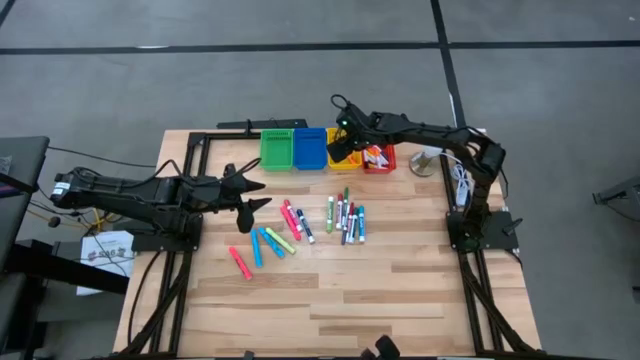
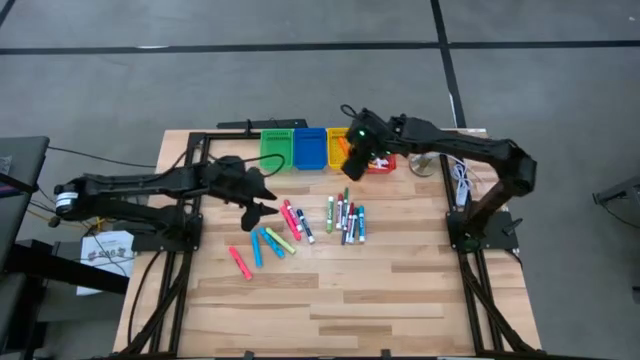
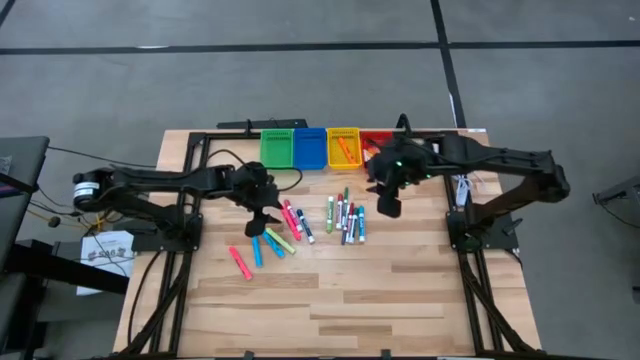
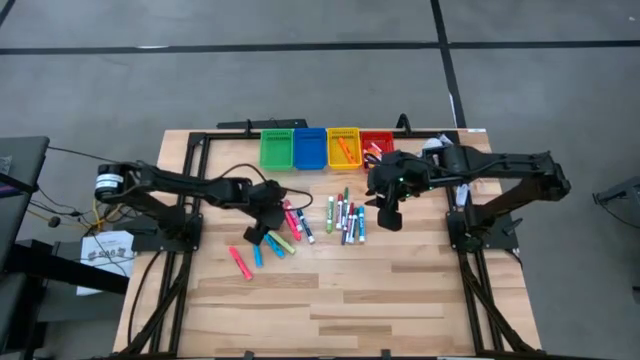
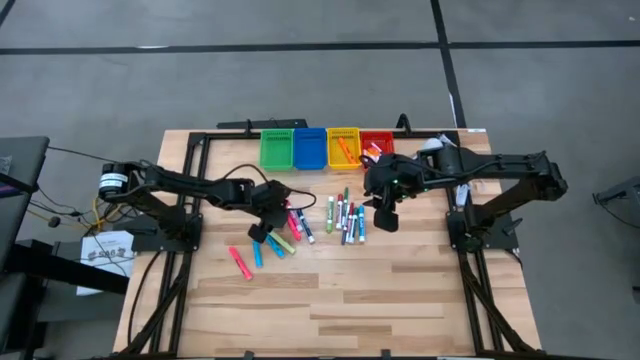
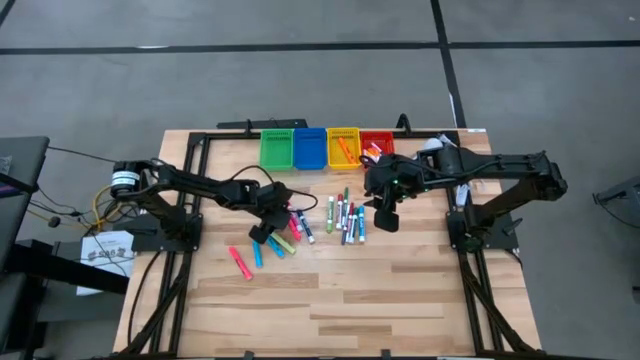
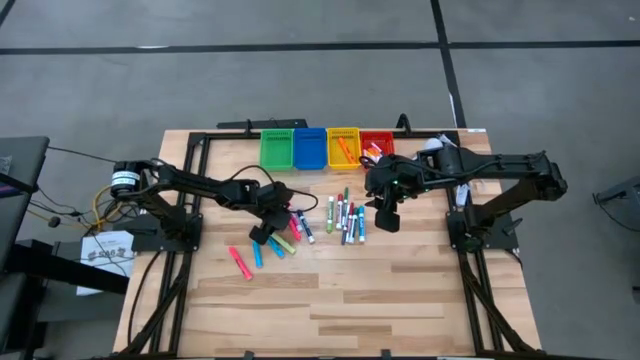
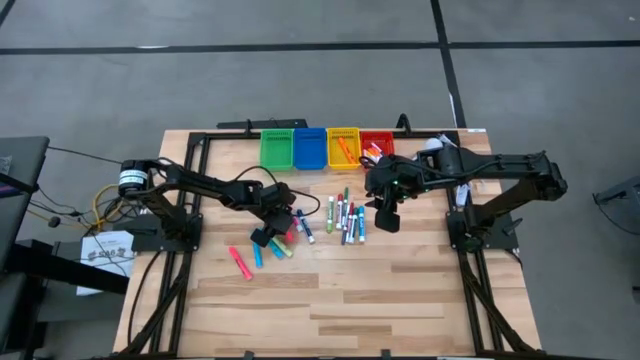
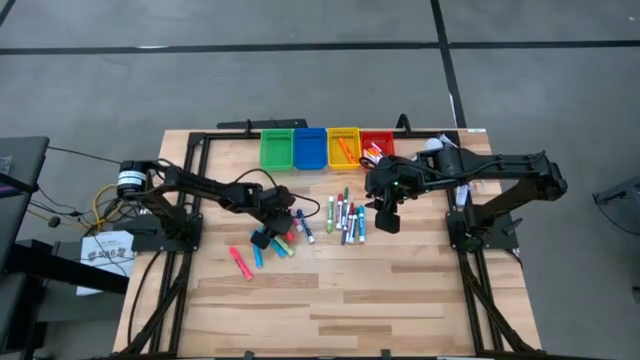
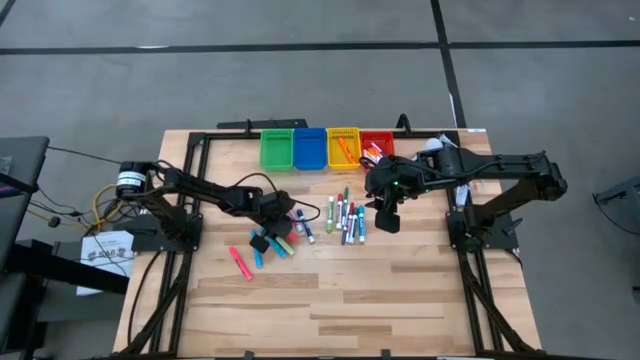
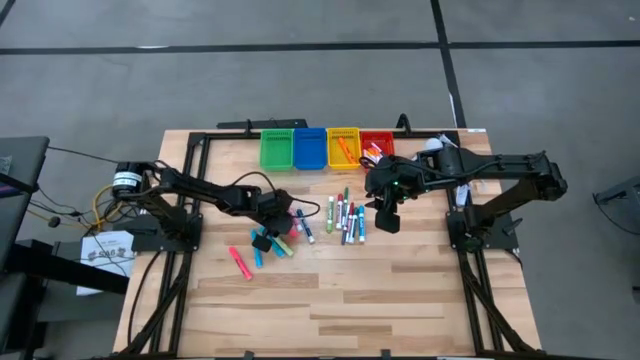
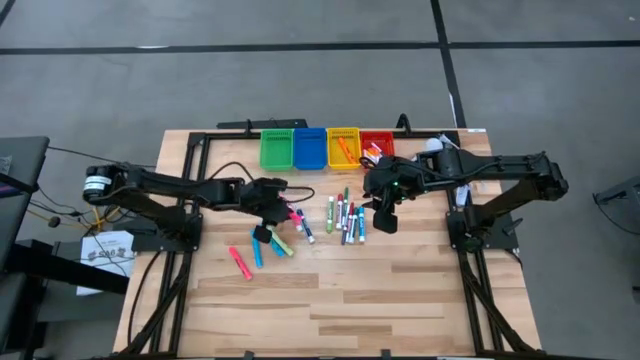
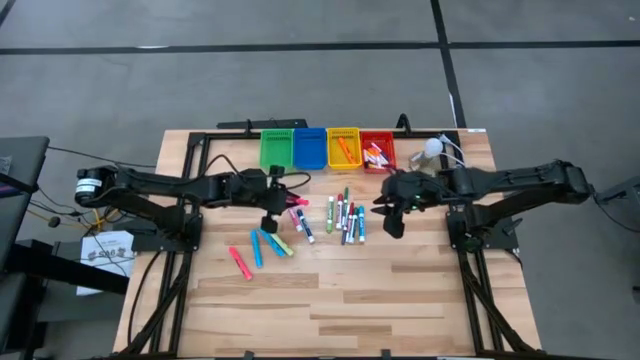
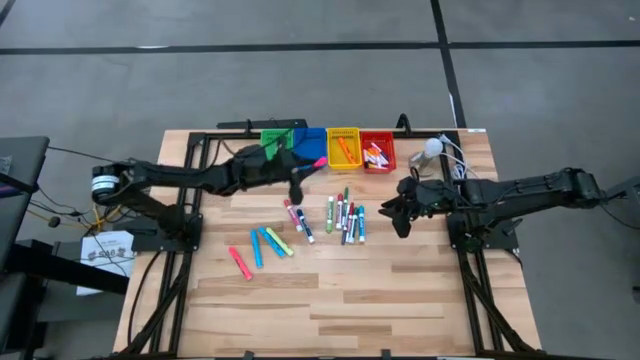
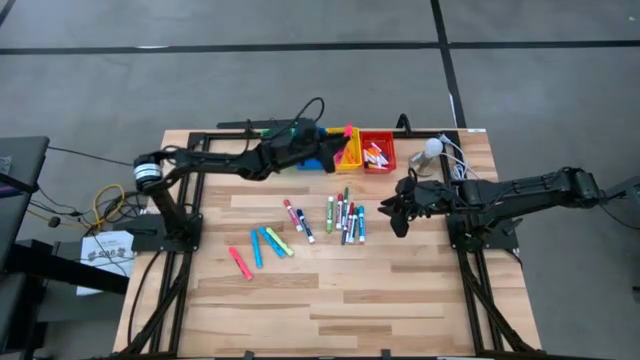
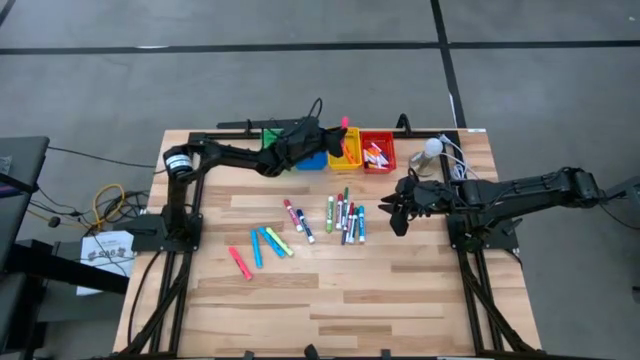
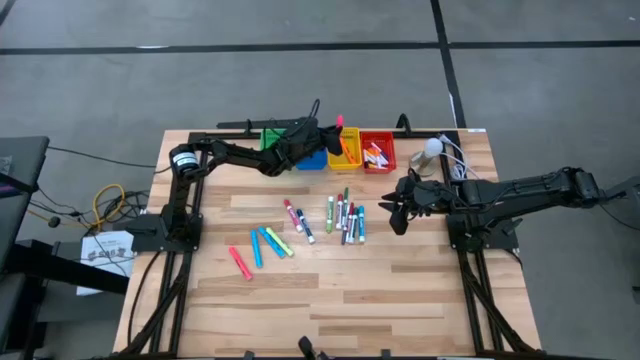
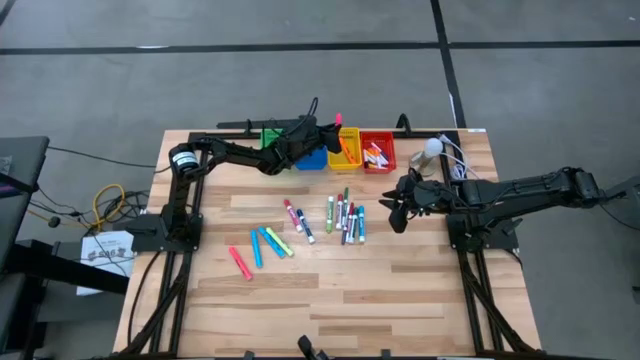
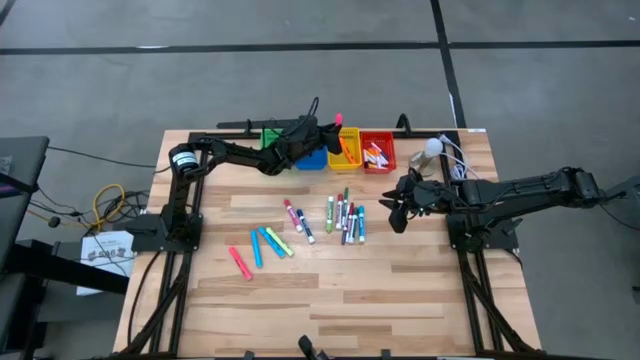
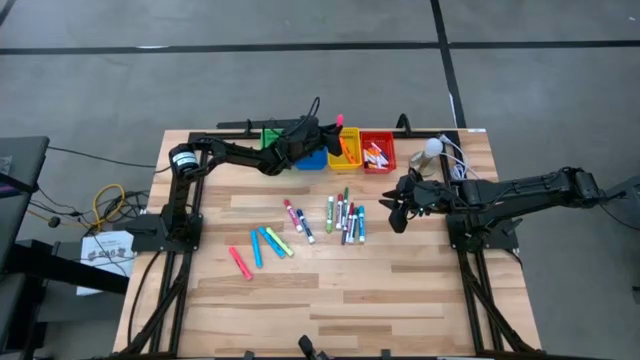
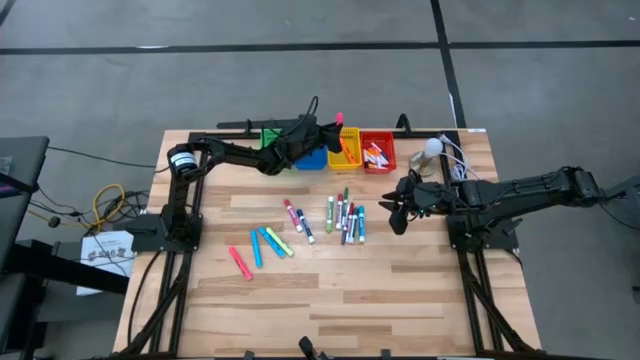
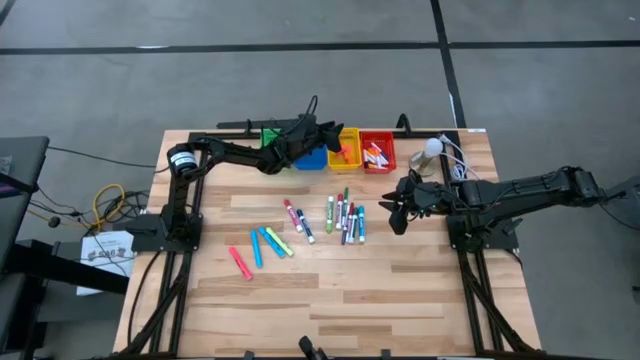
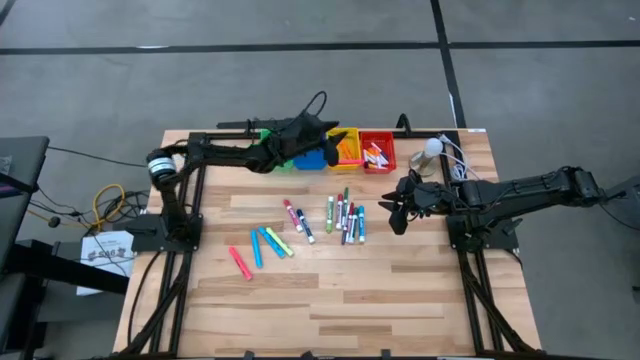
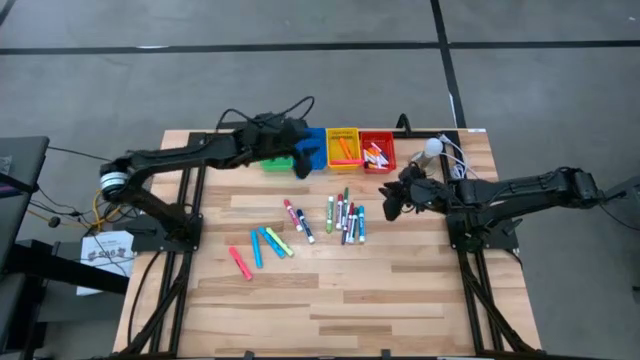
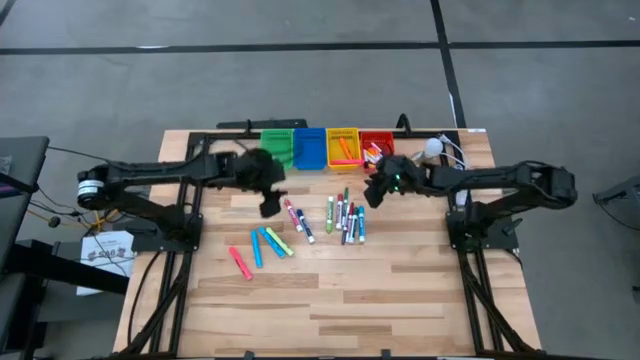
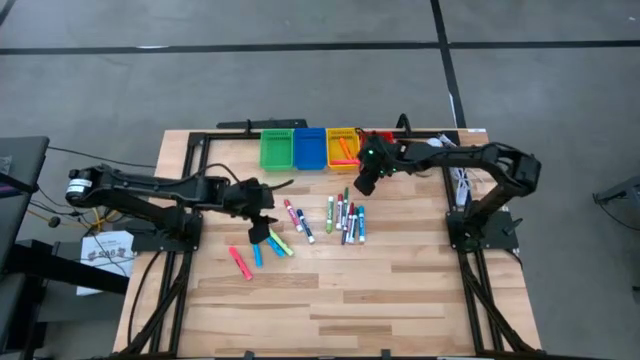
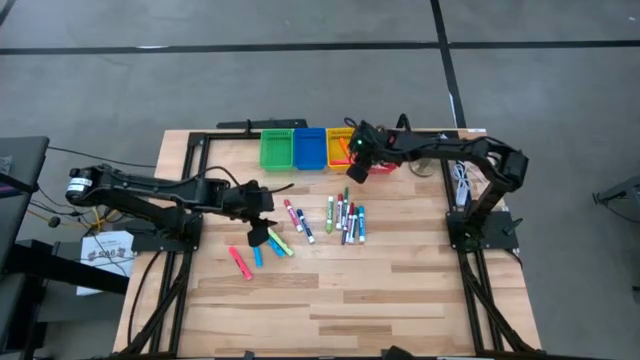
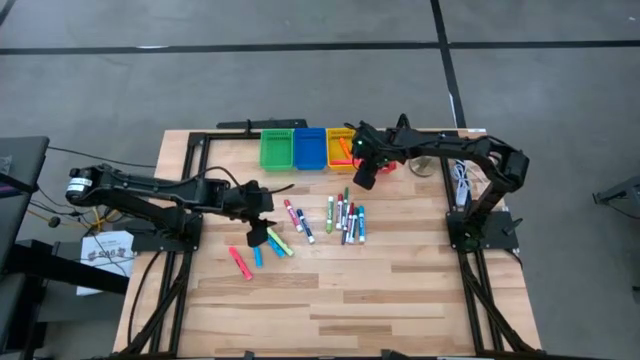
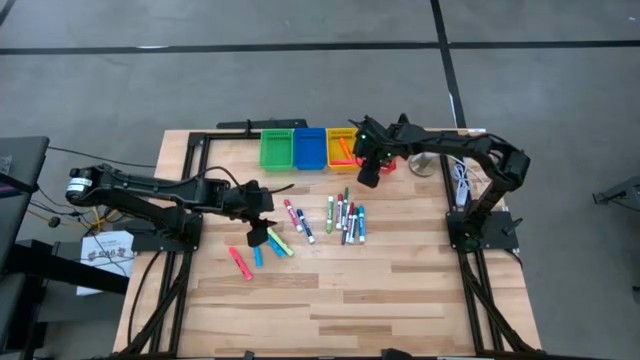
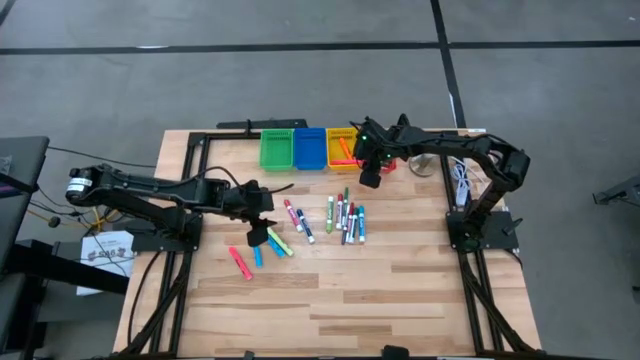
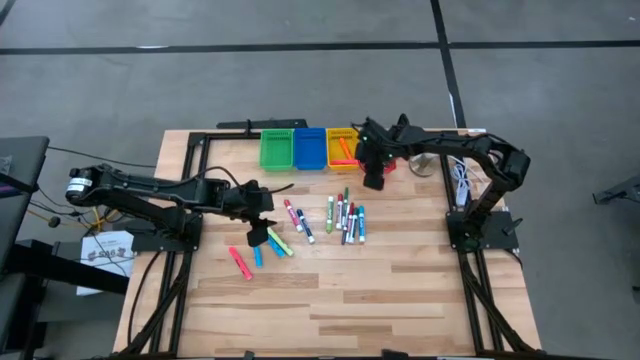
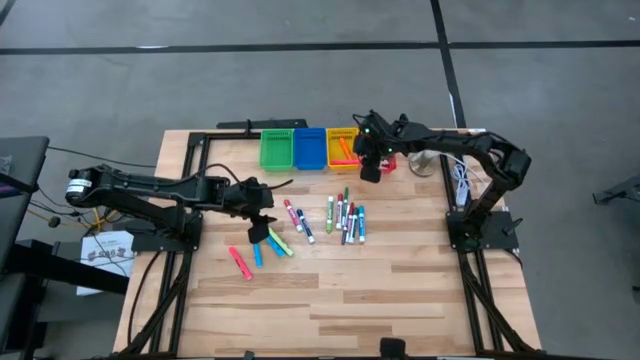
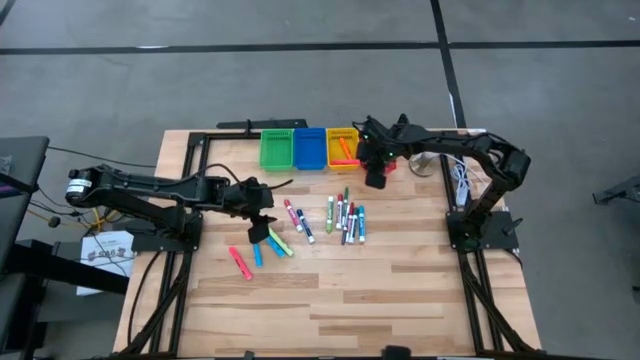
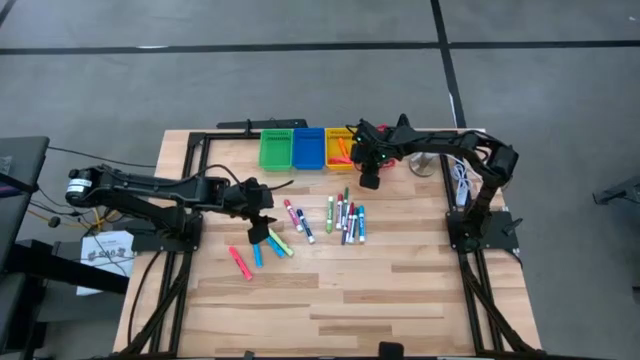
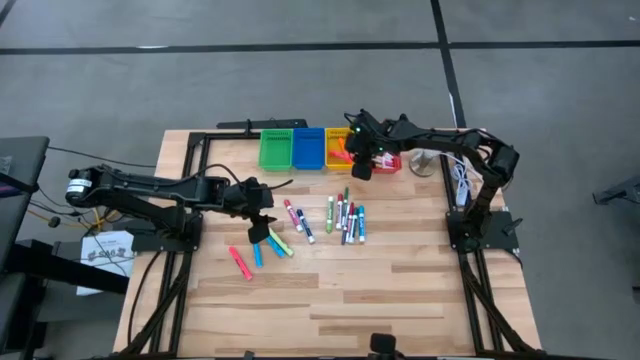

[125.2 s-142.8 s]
Task: Pick & Place Markers
Put the right pink highlighter into the yellow basket

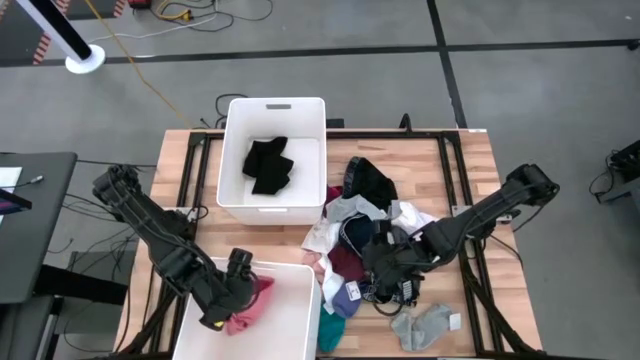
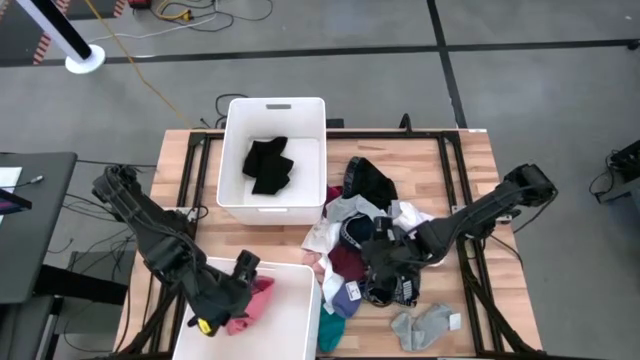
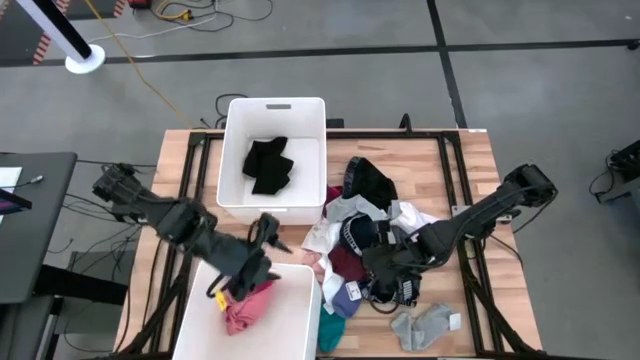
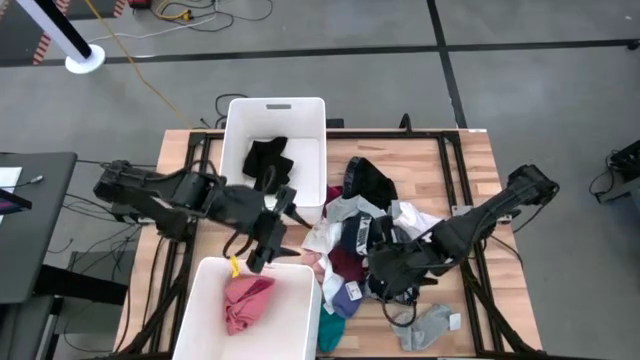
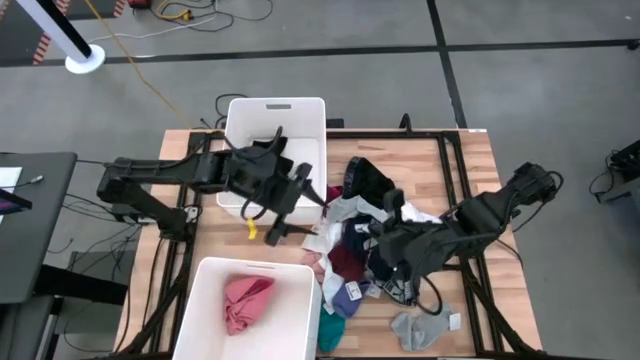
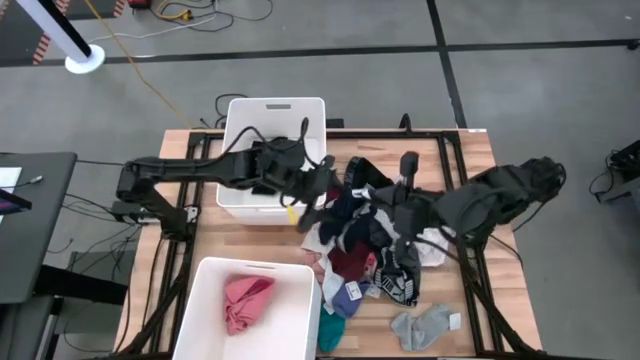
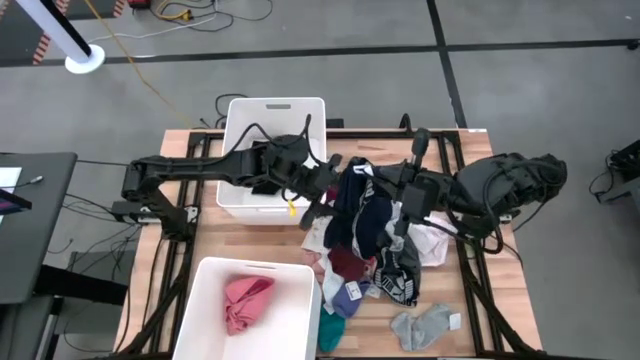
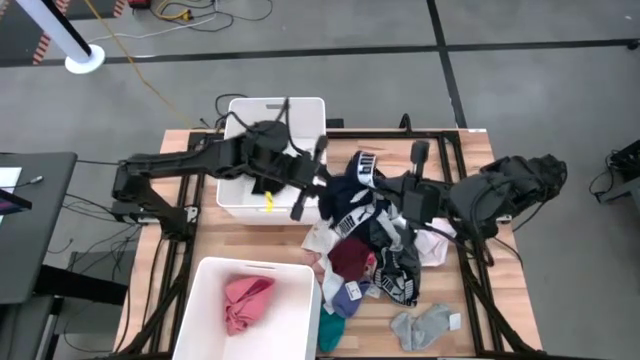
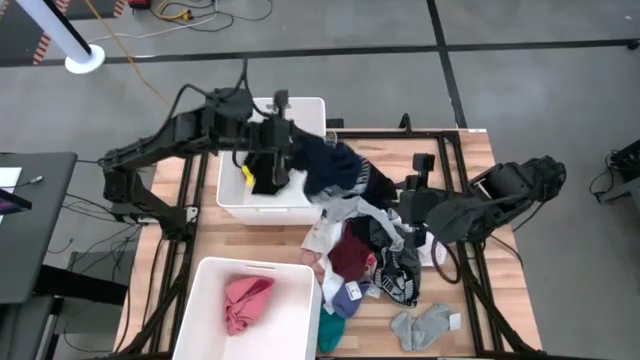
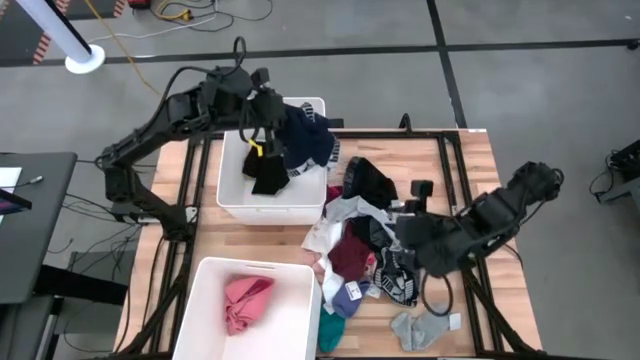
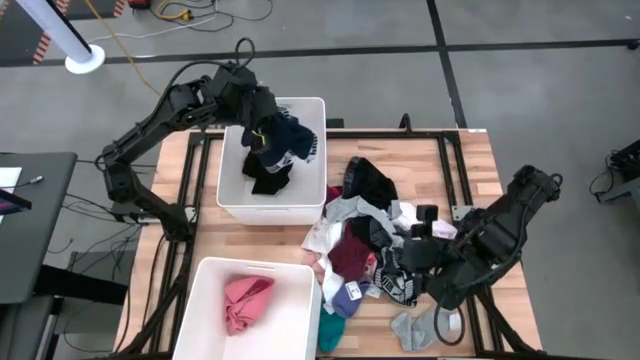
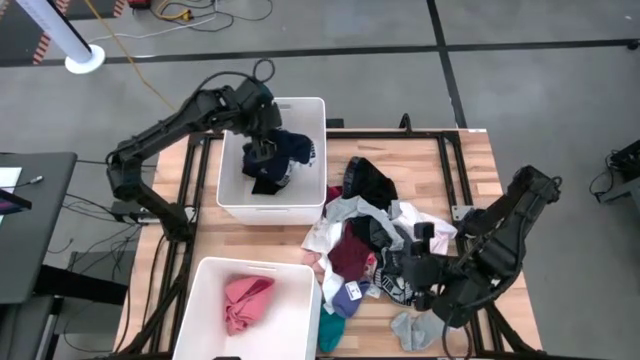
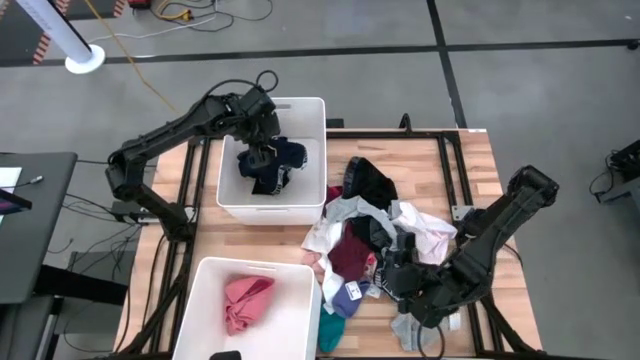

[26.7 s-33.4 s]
Task: Sort clothes
Put the dark blue underwear into the top white laundry bin
